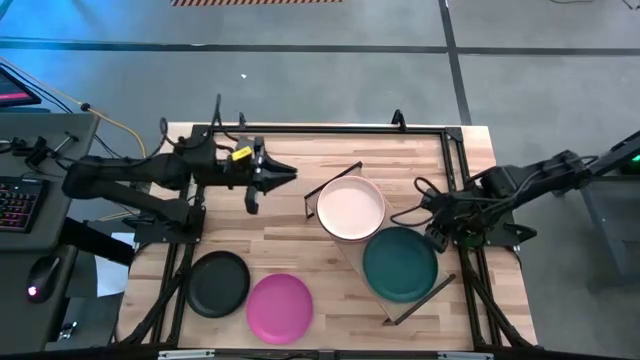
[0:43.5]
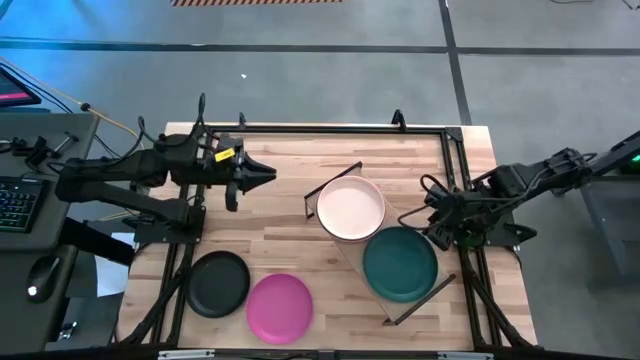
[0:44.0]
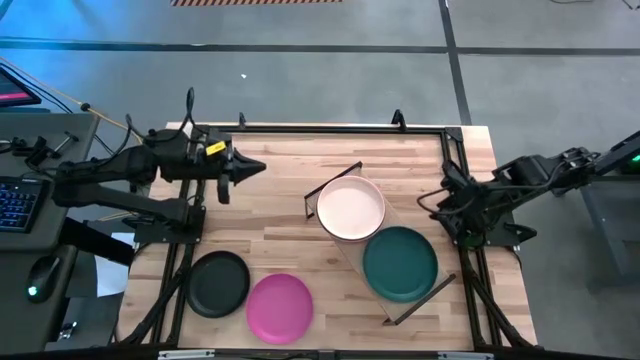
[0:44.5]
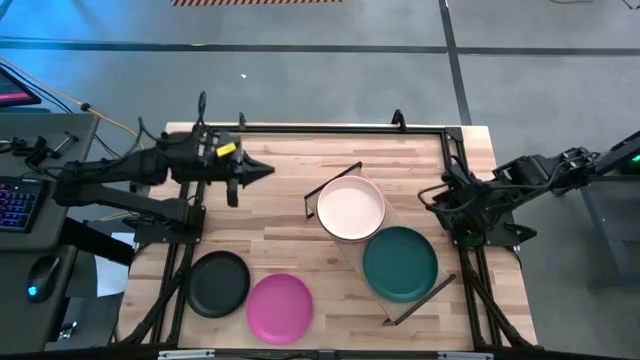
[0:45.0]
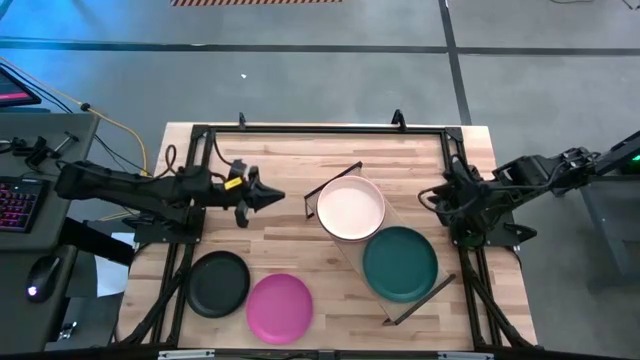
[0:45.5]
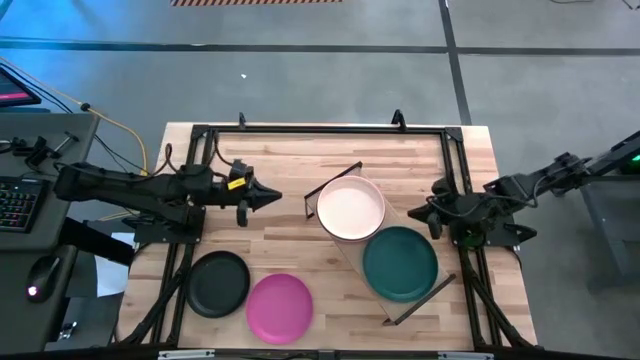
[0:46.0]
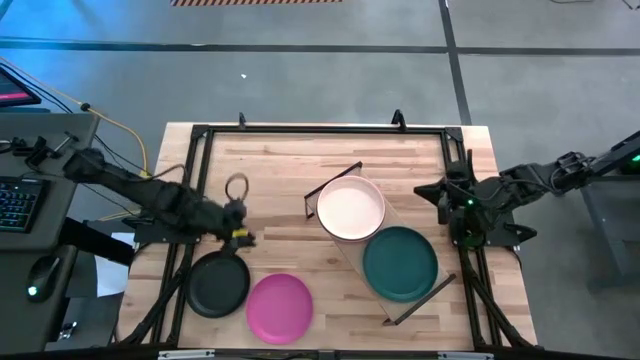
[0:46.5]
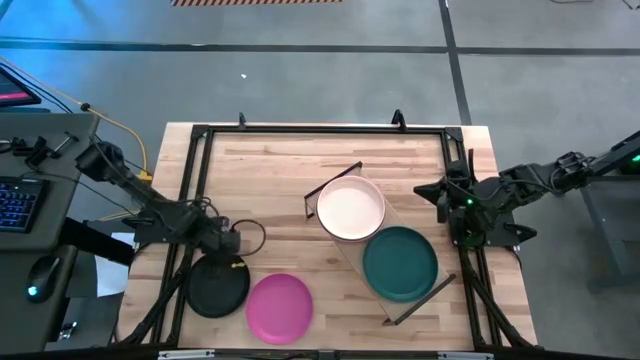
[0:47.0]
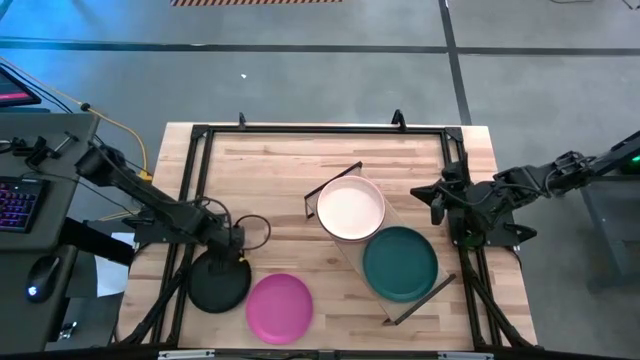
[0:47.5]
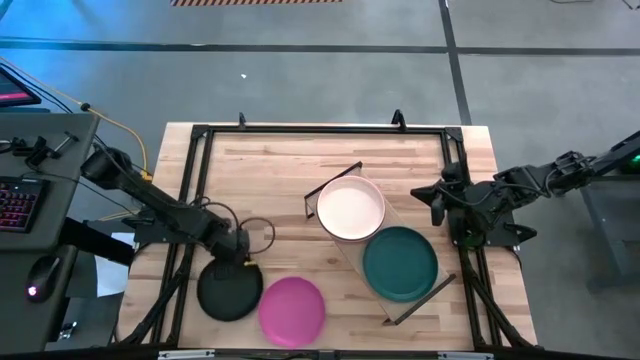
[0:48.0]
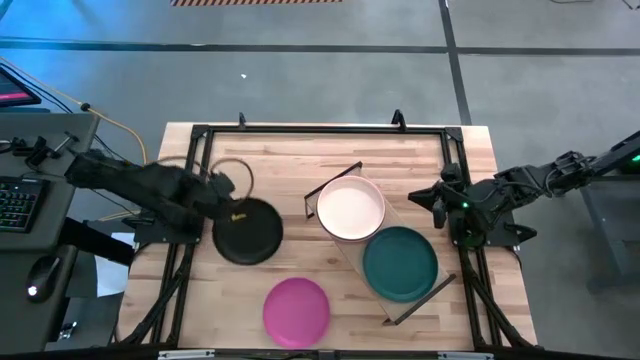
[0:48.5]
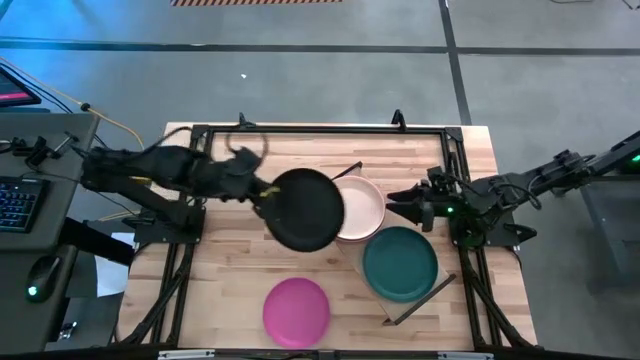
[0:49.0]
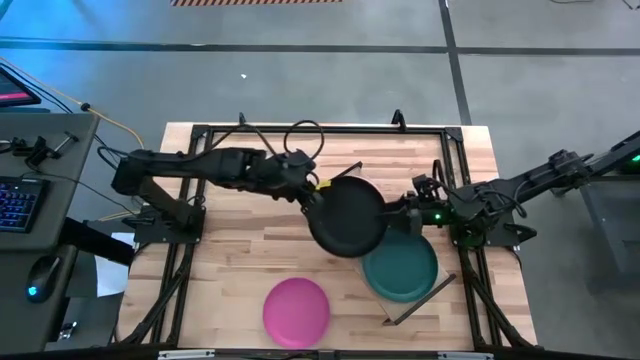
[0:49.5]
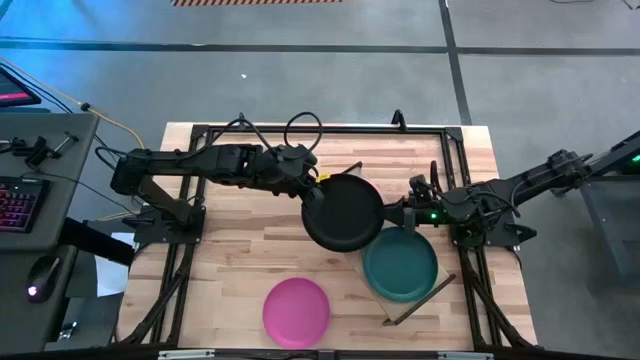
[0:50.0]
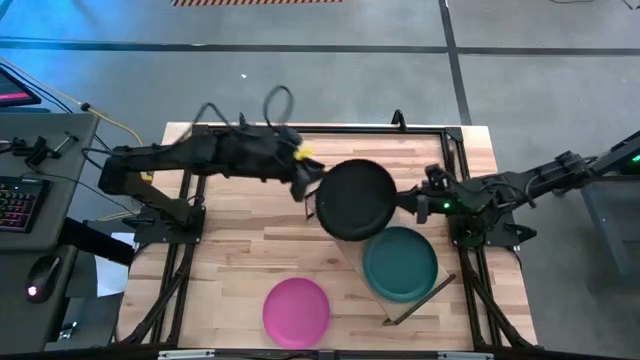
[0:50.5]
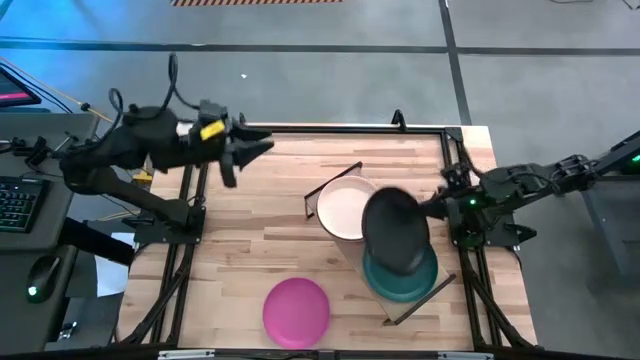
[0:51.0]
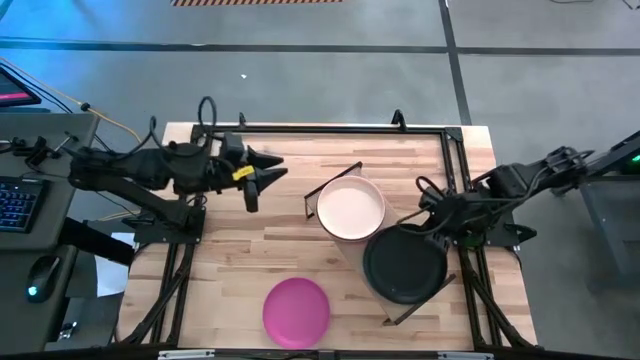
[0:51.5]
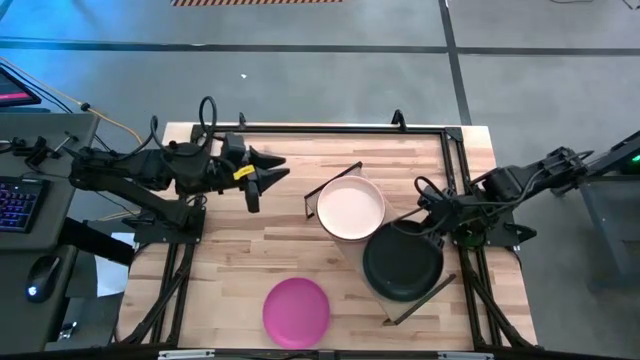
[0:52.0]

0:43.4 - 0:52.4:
Task: Place and stack plates onto a shelf
Stack the black plate on the green plate

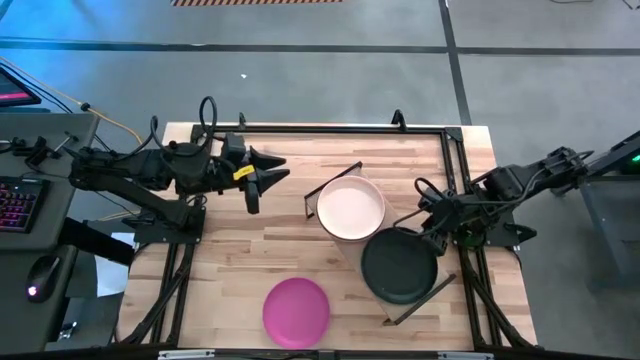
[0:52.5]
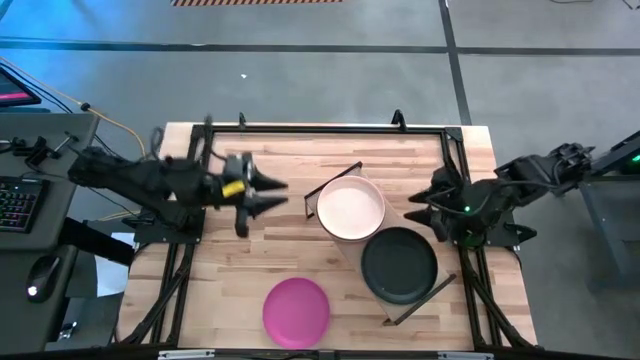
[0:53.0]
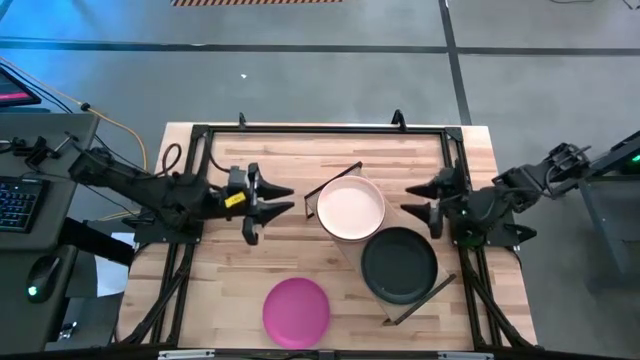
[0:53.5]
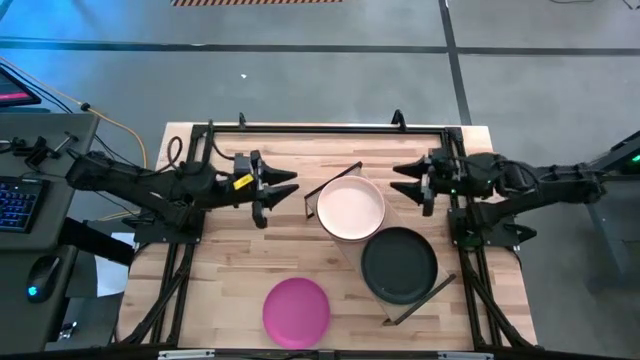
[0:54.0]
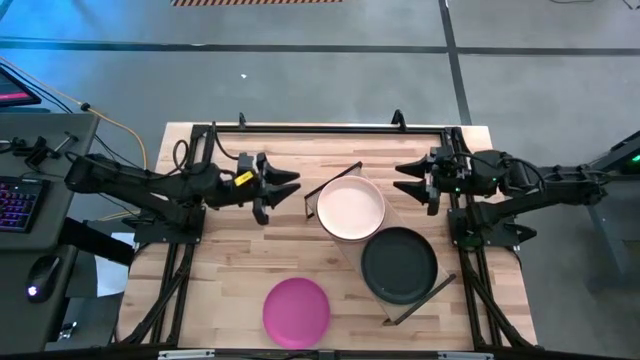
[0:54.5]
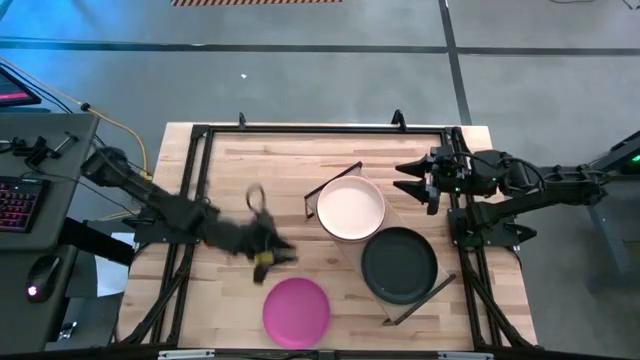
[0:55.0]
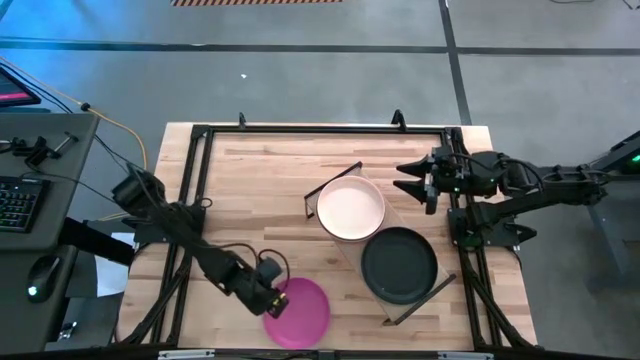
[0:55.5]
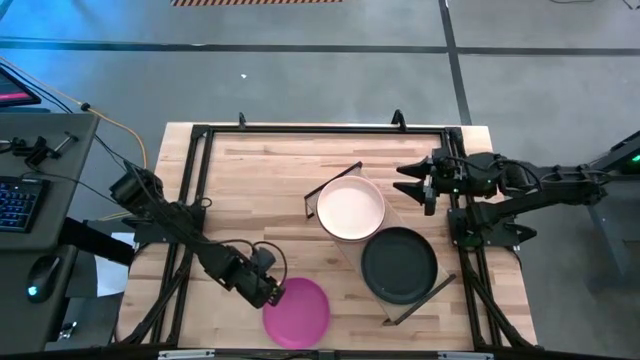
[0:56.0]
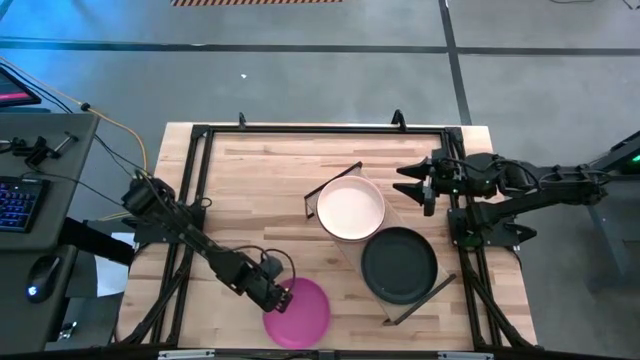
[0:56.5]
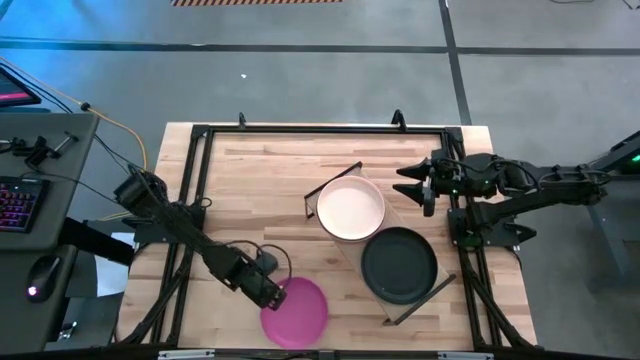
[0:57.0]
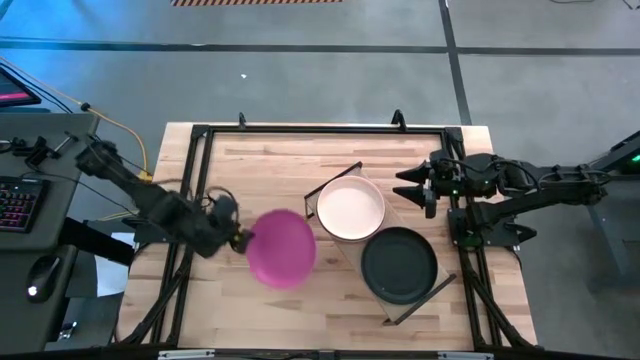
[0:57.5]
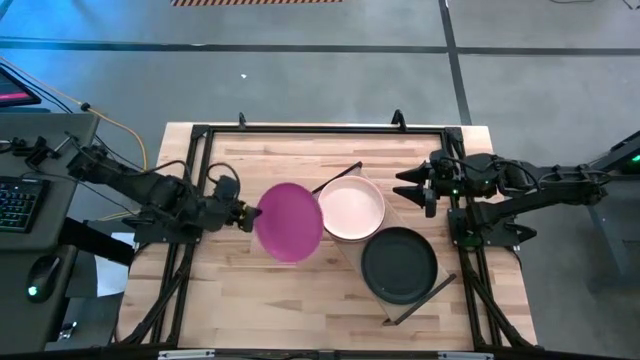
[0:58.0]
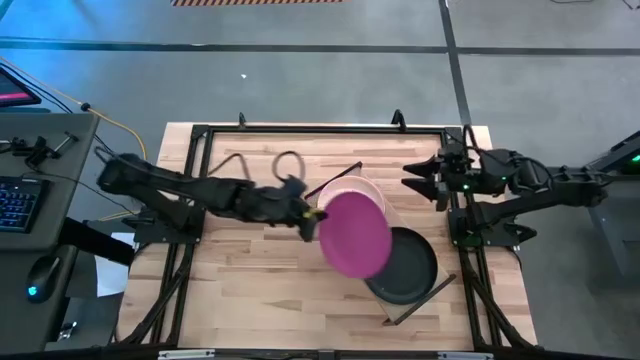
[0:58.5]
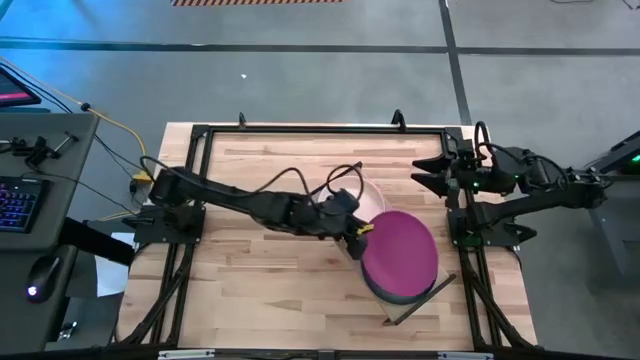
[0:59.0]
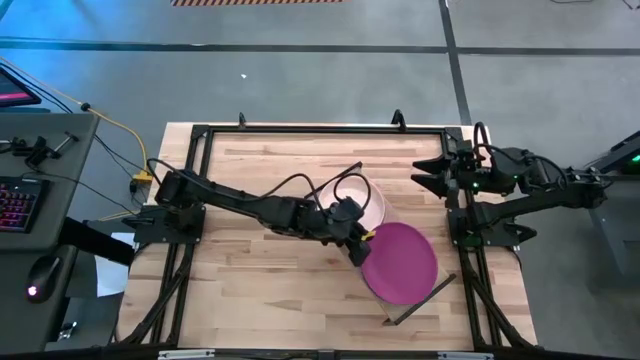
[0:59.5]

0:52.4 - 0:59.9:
Stack the dark pink plate on the black plate

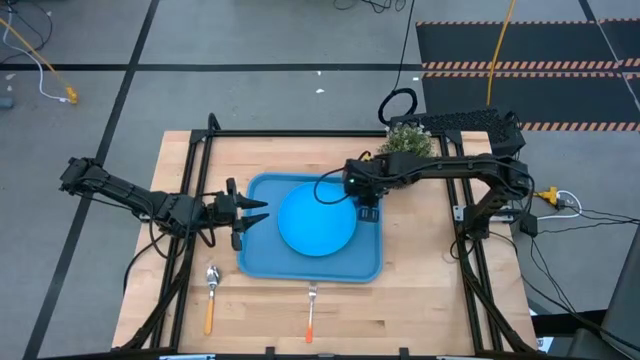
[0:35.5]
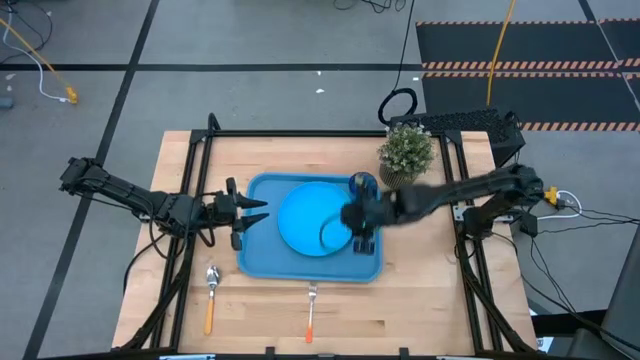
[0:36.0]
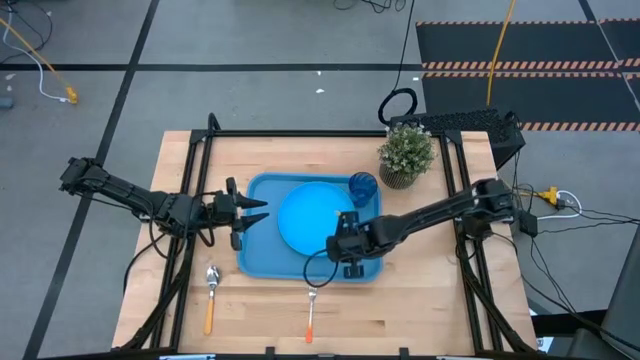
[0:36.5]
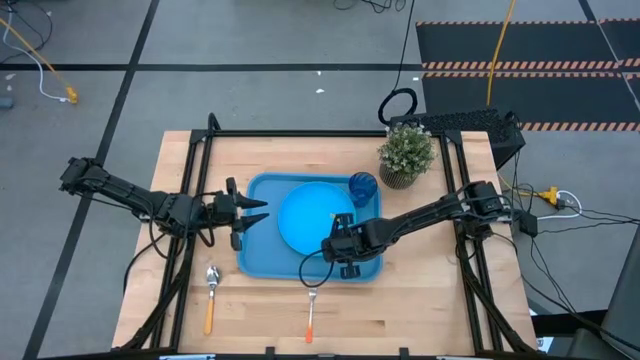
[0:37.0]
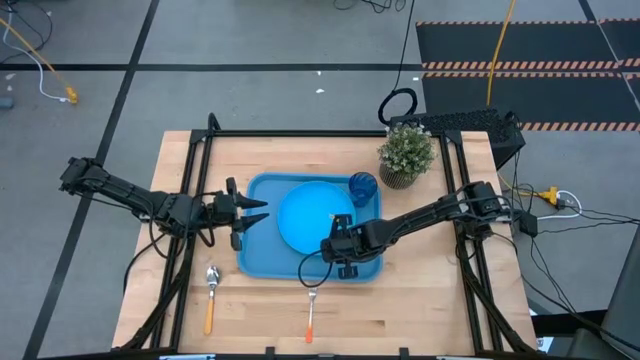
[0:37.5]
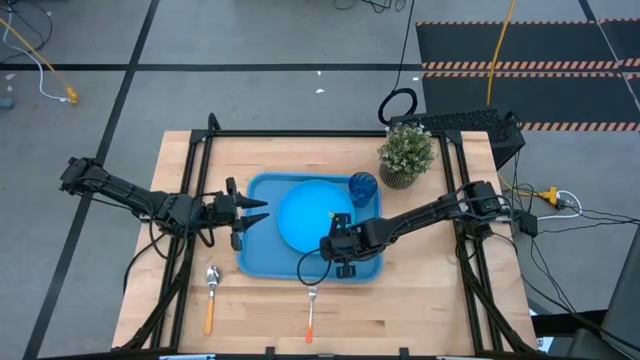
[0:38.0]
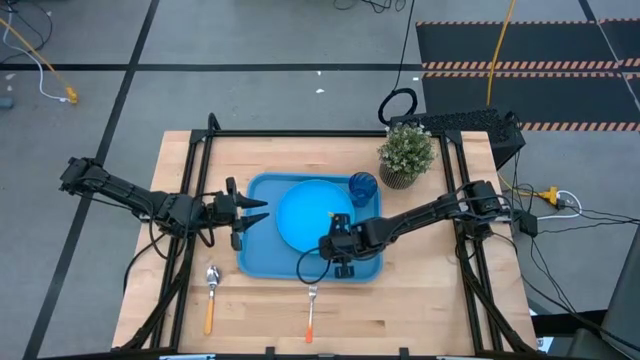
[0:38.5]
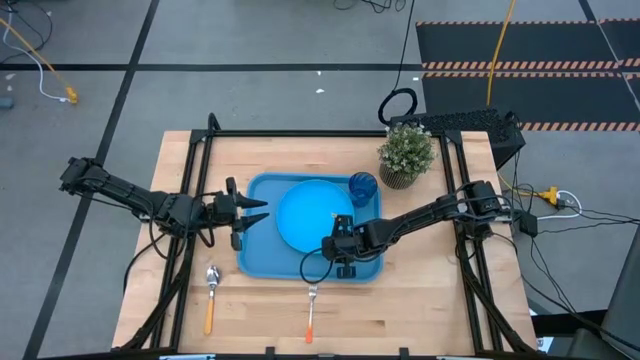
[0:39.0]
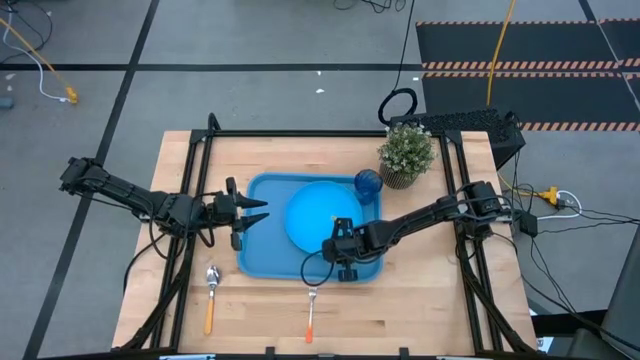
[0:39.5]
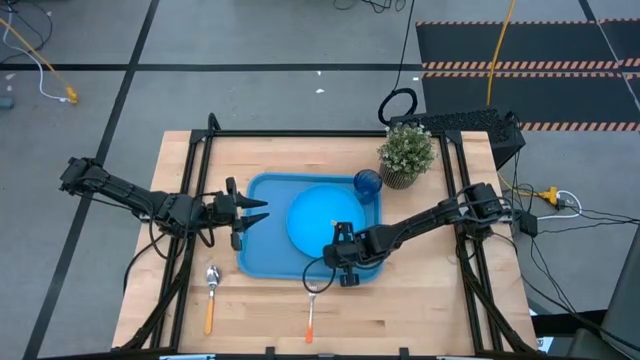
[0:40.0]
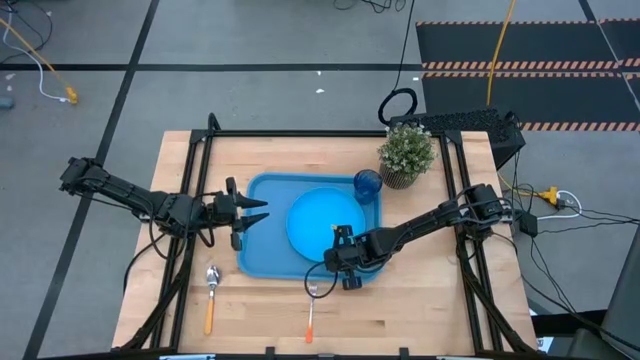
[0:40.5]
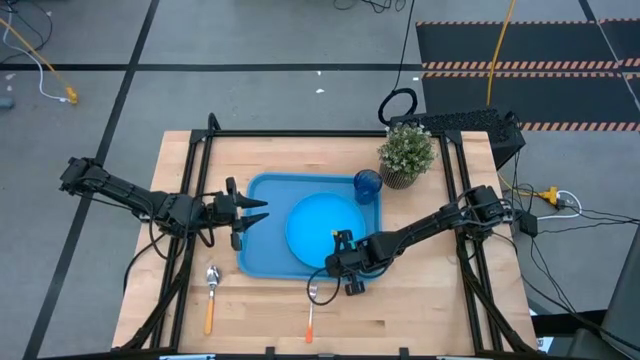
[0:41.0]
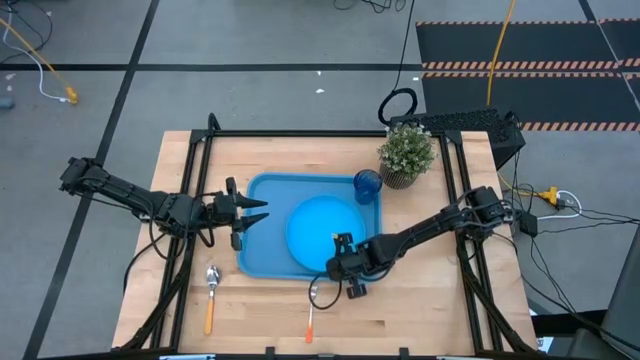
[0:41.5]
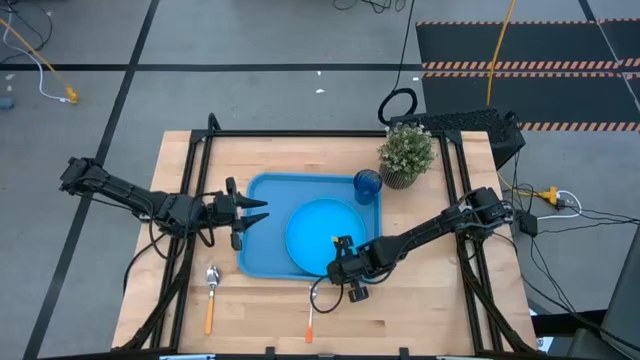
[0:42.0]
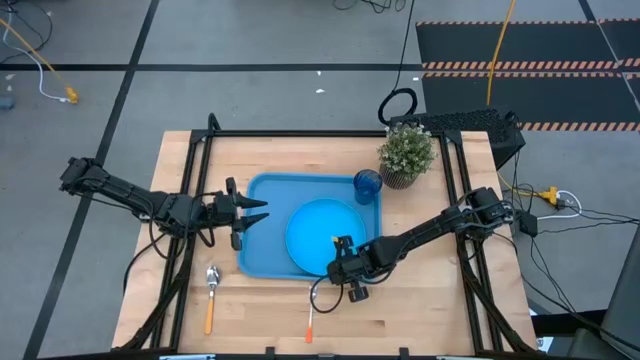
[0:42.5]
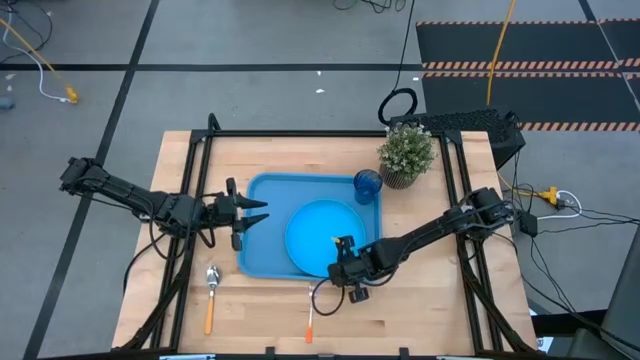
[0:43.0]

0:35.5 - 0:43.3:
Task: Pick and place plate/cup/fork/spoon on tray
Move the blue plate on the blue tray to the bottom left of the blue cup
